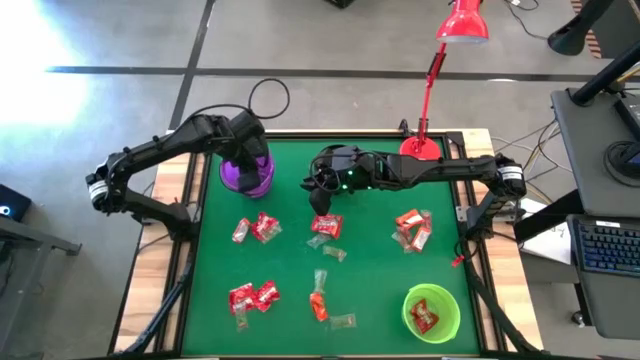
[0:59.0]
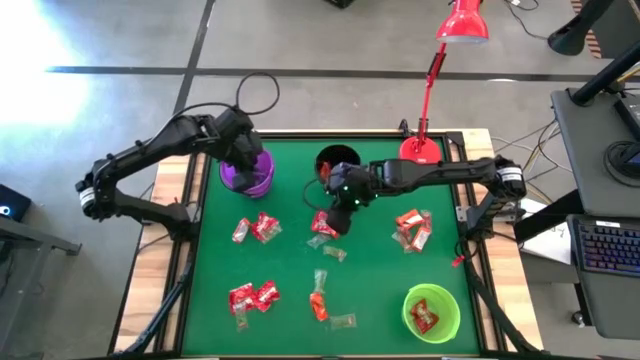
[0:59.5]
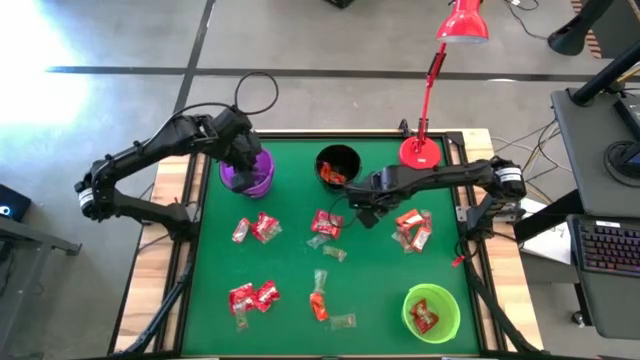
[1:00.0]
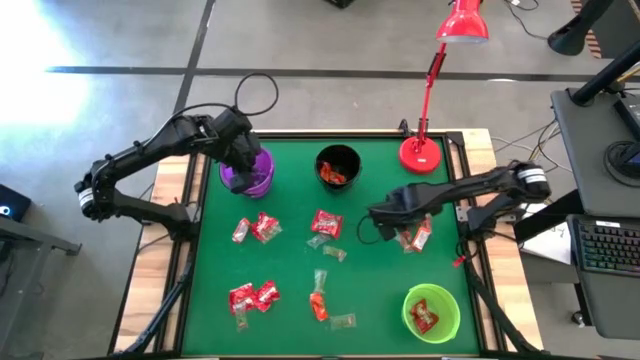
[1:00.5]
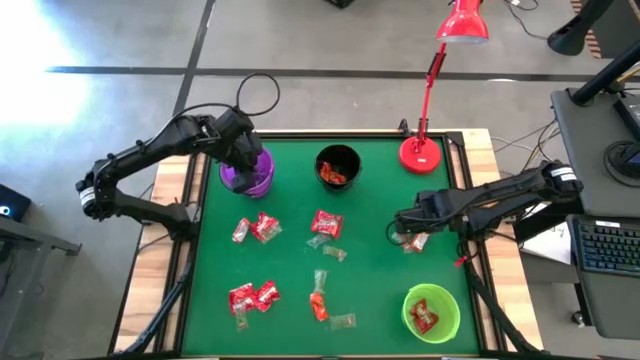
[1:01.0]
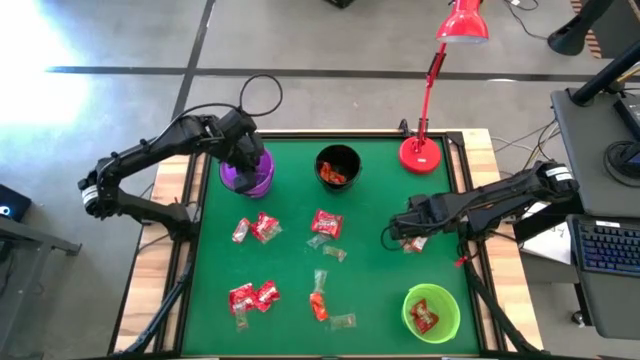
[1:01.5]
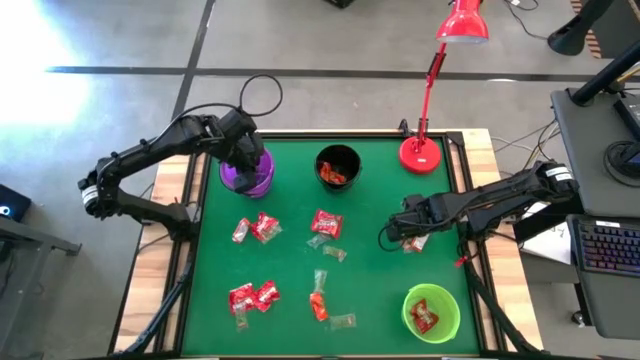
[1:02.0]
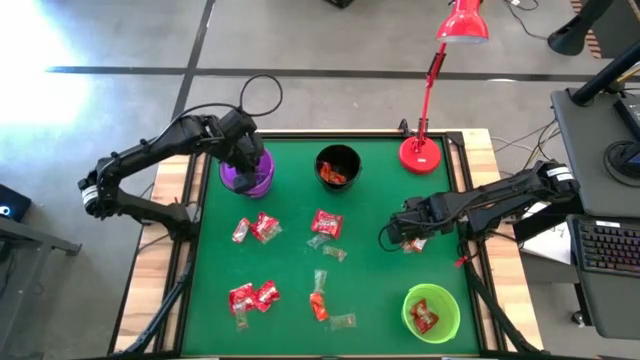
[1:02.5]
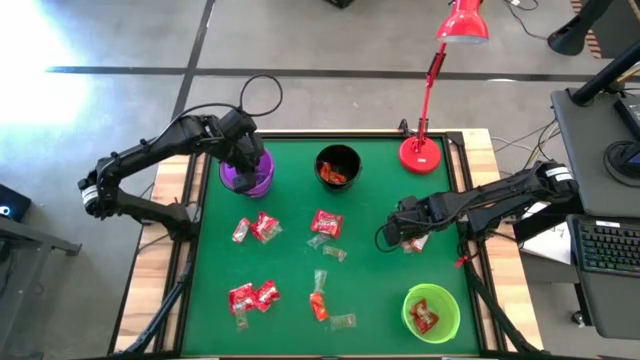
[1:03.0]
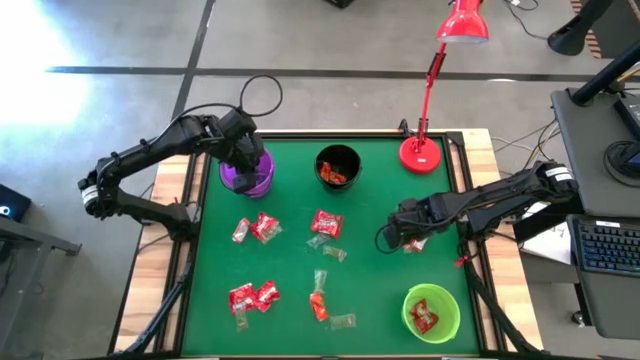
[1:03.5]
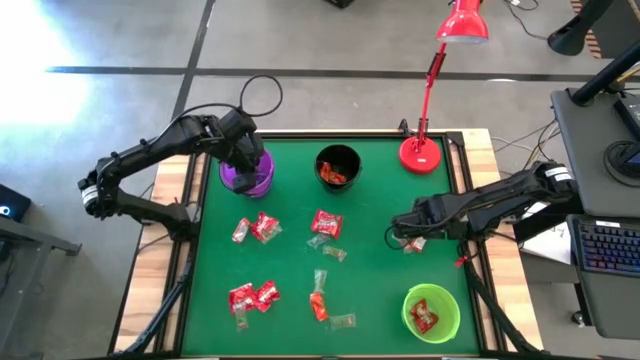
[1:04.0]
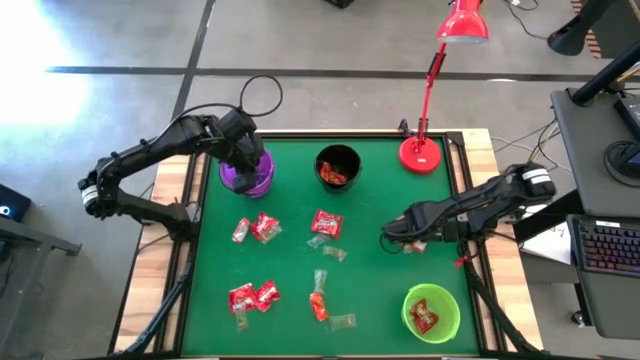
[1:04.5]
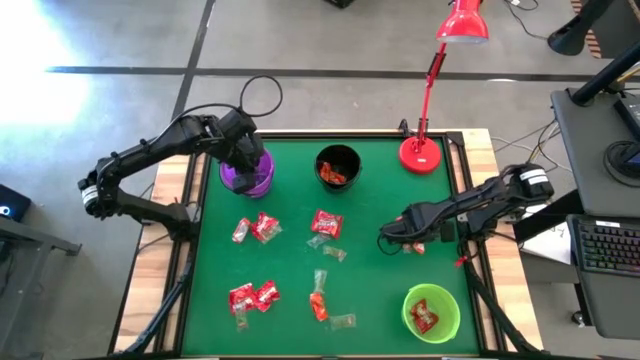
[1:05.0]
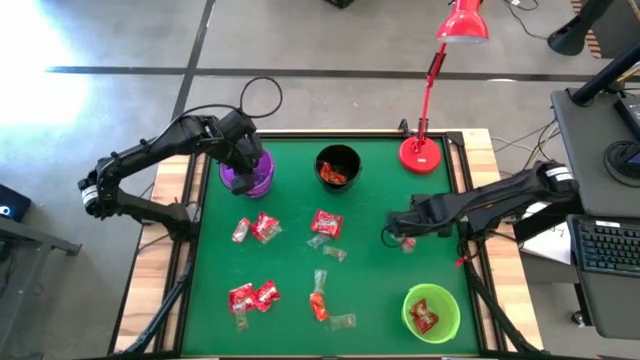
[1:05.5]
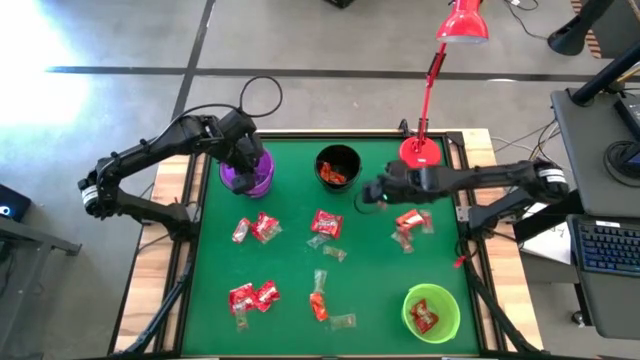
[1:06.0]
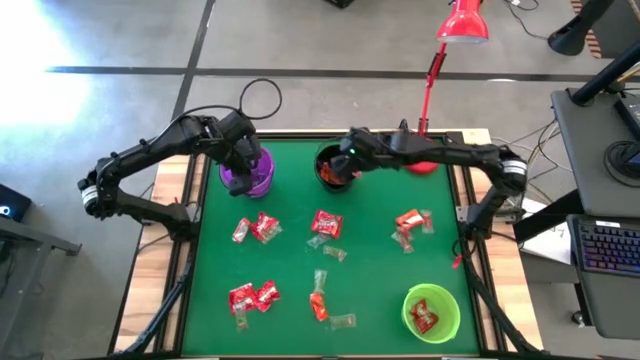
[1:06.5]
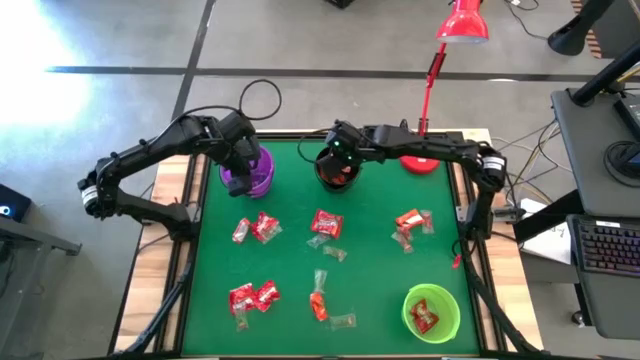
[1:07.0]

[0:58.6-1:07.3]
Task: Sort candy
Put the orange chocolate into the black bucket

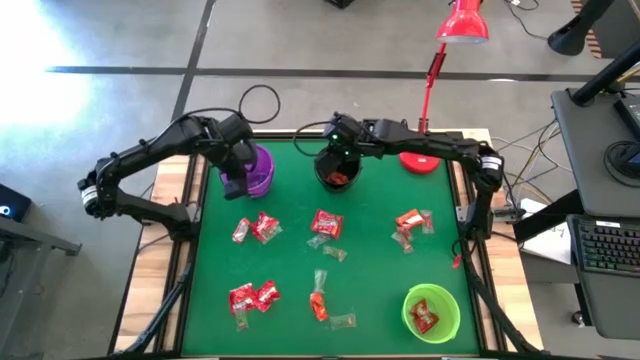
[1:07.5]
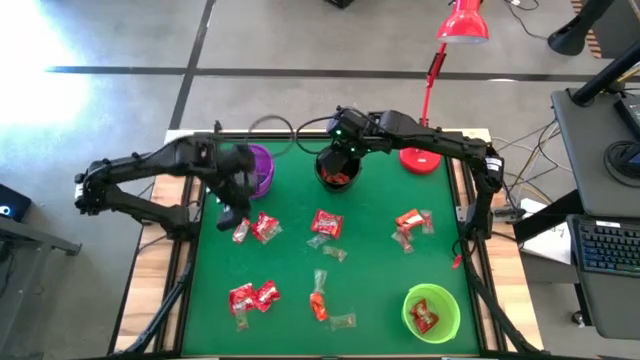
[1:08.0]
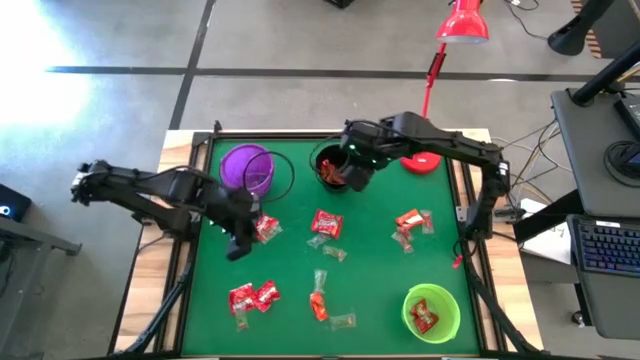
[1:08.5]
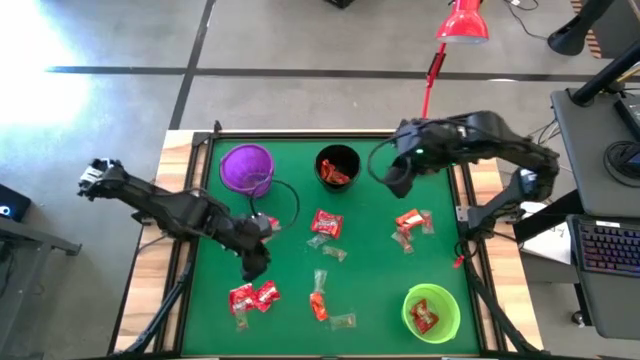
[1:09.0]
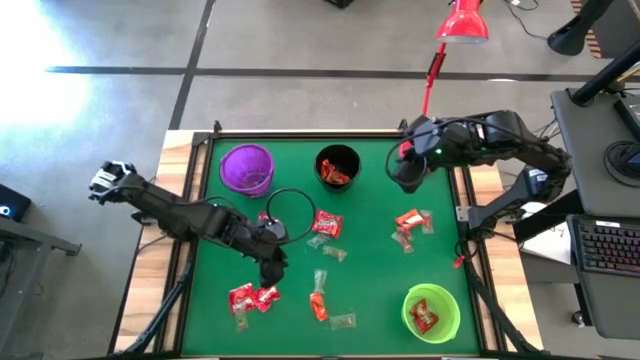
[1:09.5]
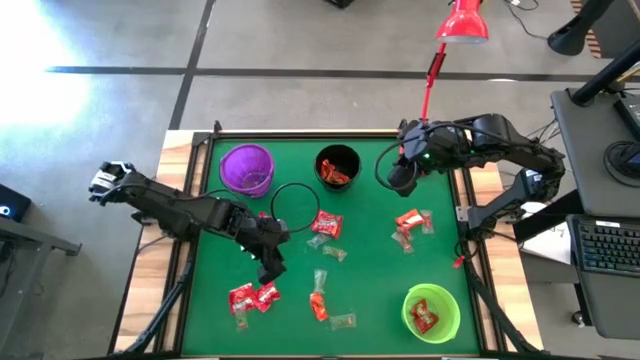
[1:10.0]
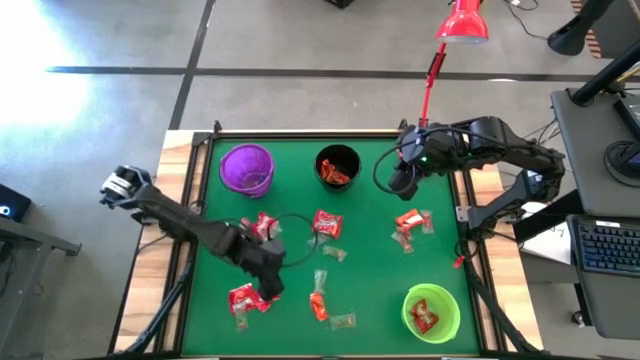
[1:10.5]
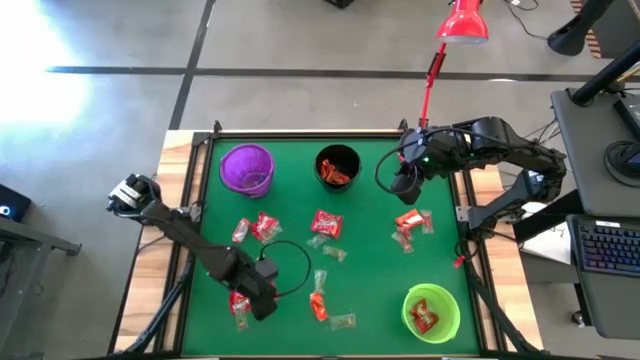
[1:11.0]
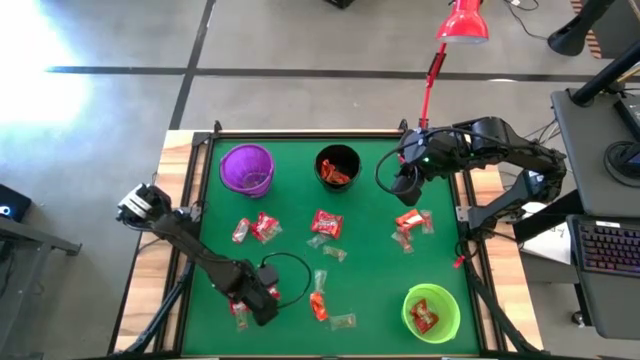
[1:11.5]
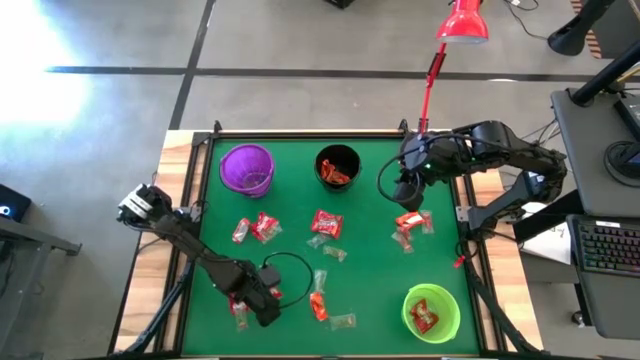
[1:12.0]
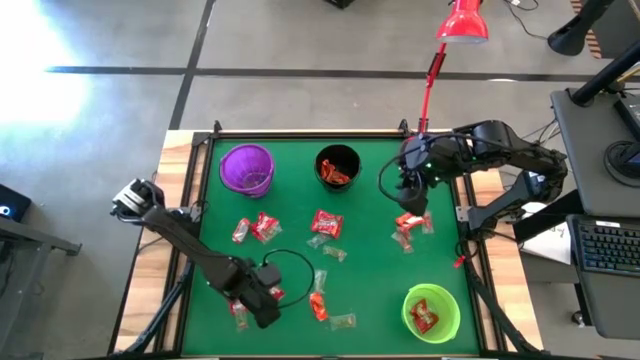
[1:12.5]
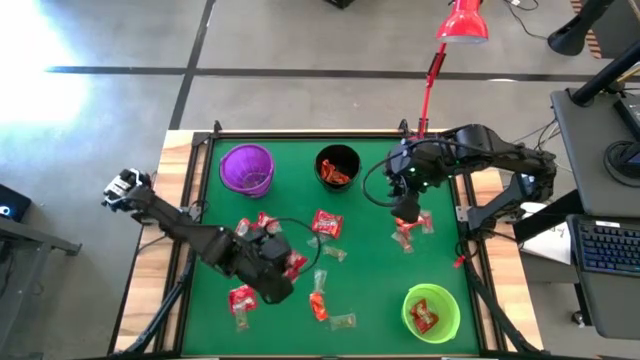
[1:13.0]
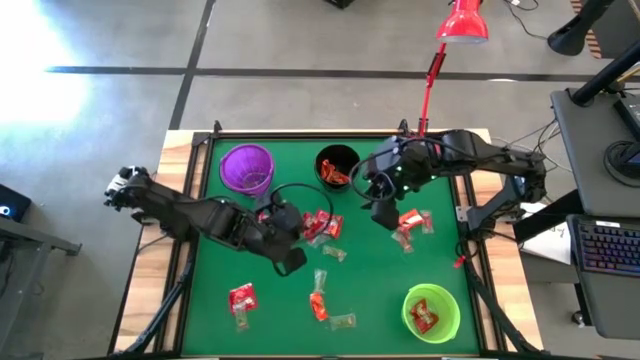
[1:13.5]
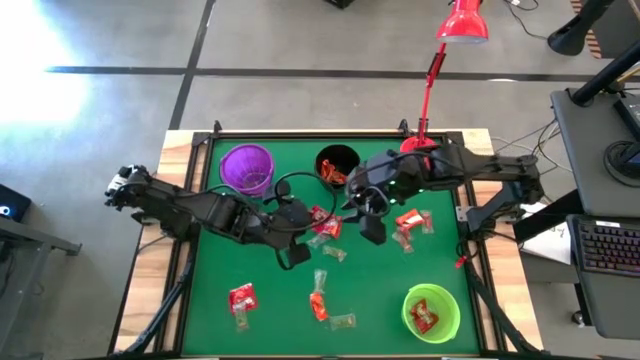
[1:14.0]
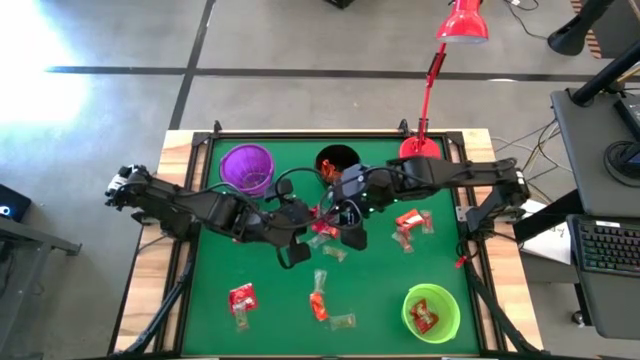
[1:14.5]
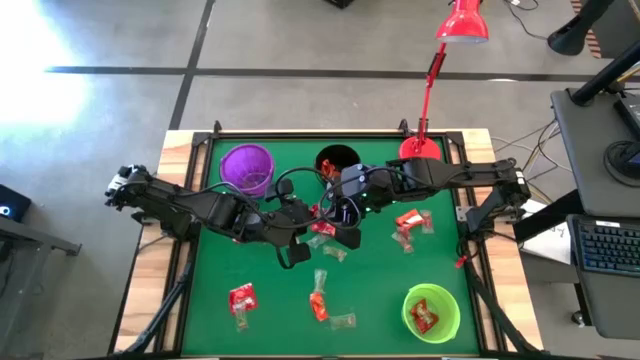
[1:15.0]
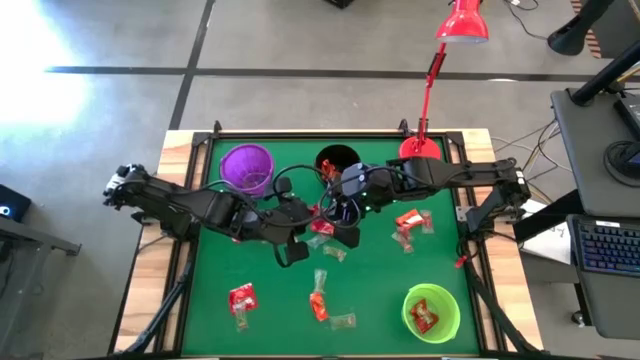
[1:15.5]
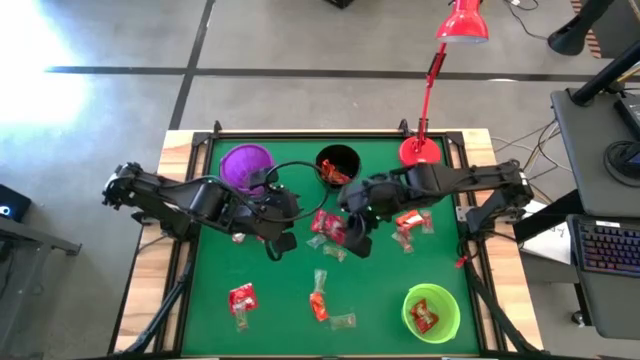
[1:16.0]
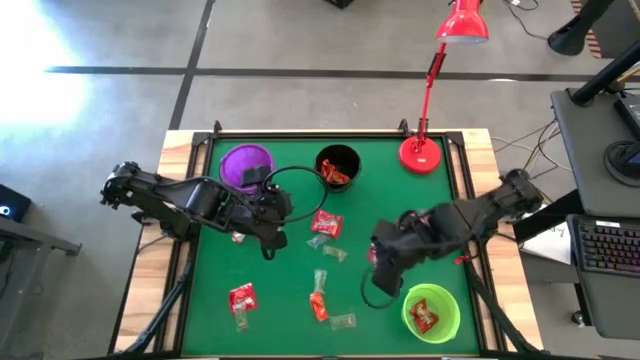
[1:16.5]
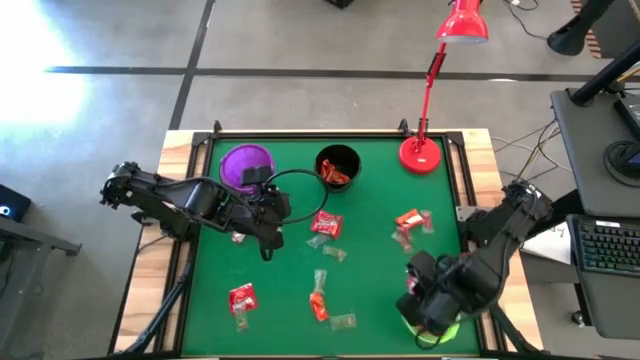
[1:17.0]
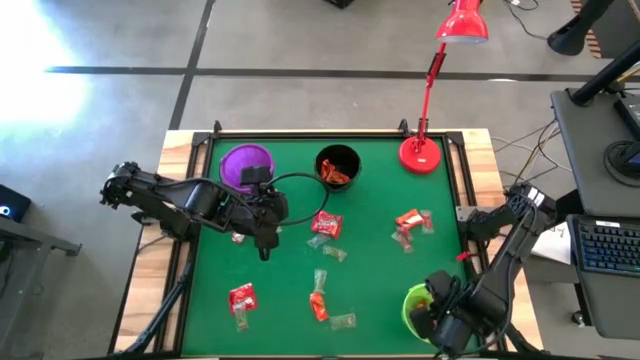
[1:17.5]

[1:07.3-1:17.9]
Put the red candy into the green bucket

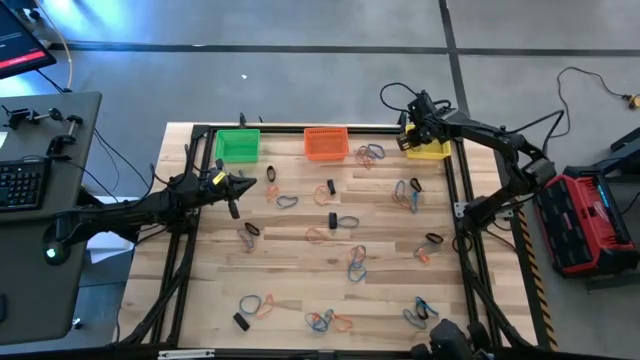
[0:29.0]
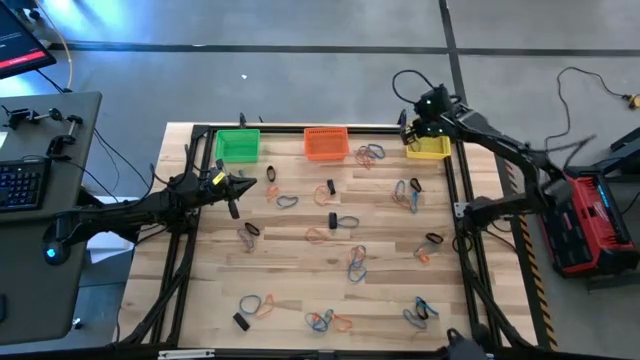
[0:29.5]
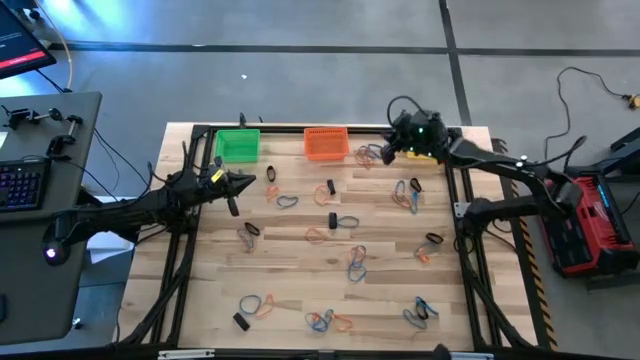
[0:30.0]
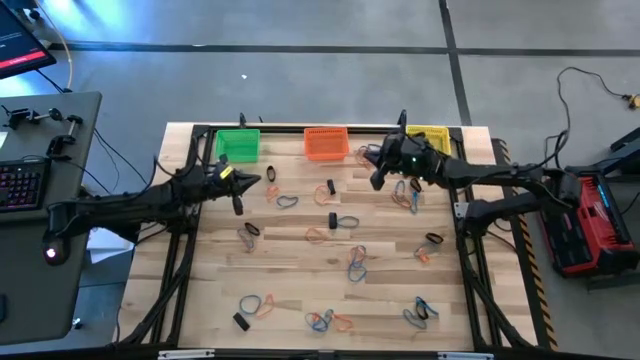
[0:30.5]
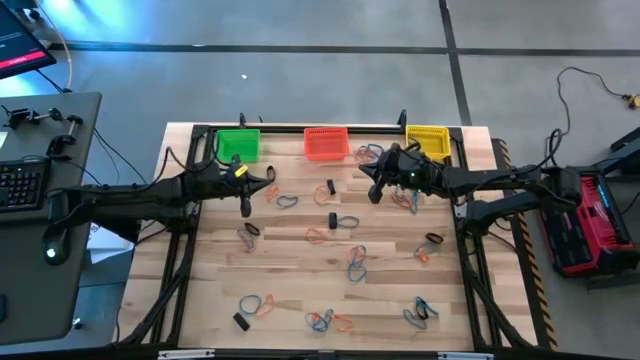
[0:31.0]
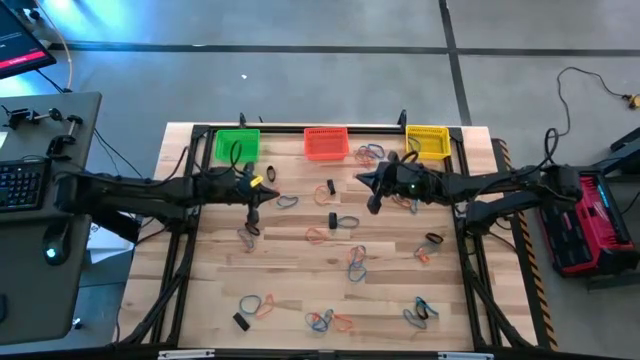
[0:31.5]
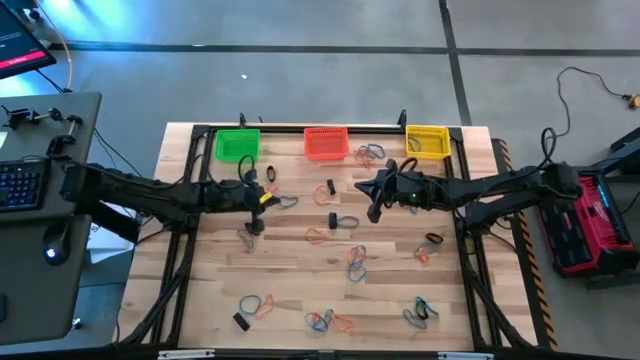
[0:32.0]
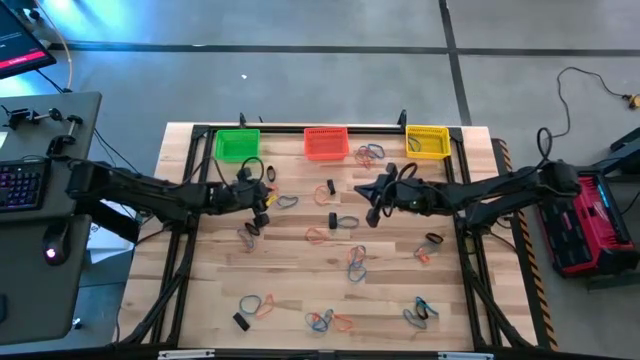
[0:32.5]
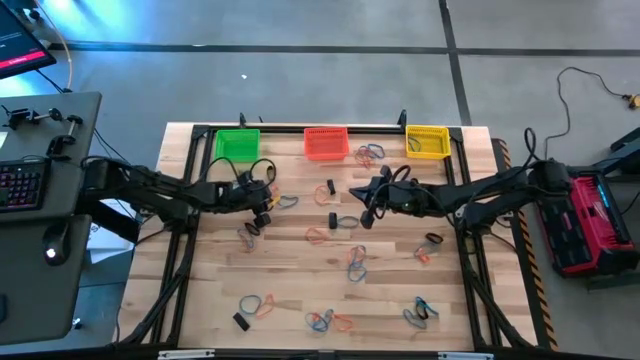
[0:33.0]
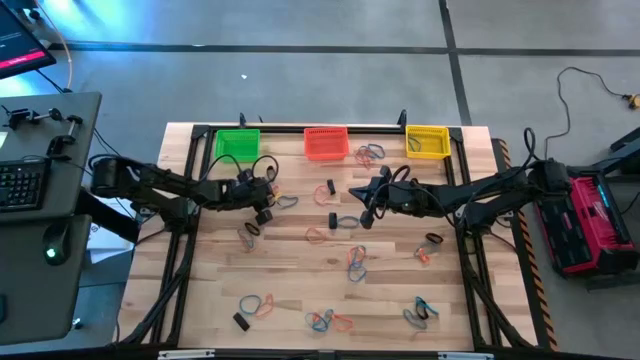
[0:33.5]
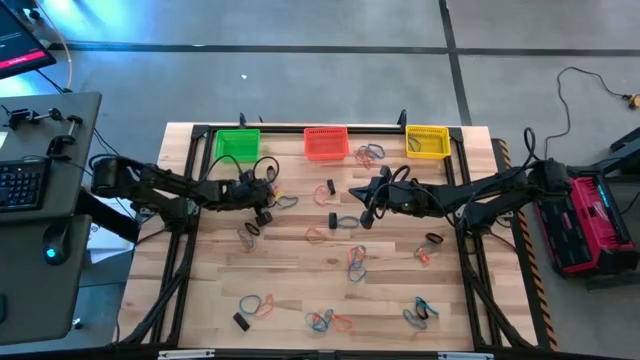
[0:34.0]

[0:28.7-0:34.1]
Task: Sort rubber bands into baskets
Put the orange rubber band into the green bin
